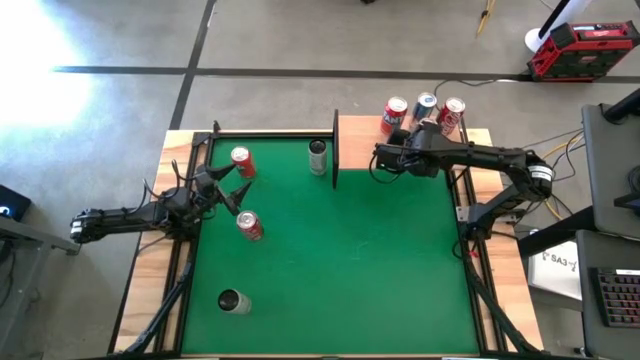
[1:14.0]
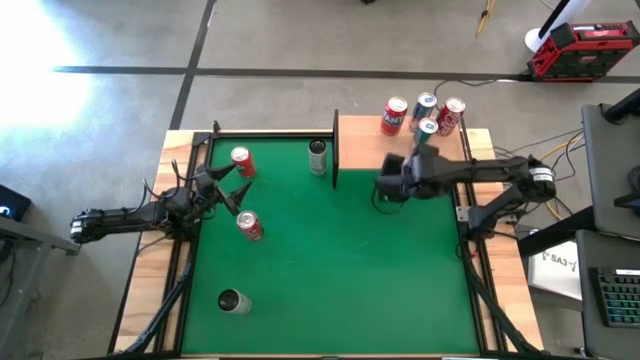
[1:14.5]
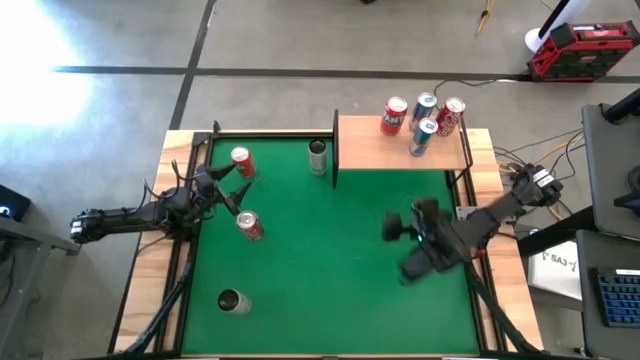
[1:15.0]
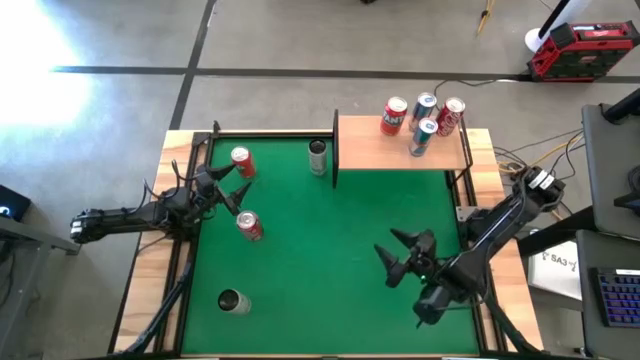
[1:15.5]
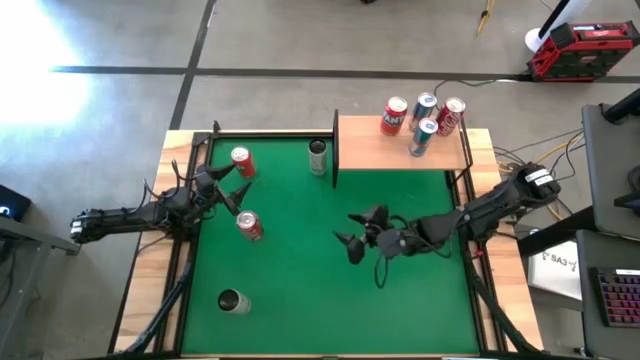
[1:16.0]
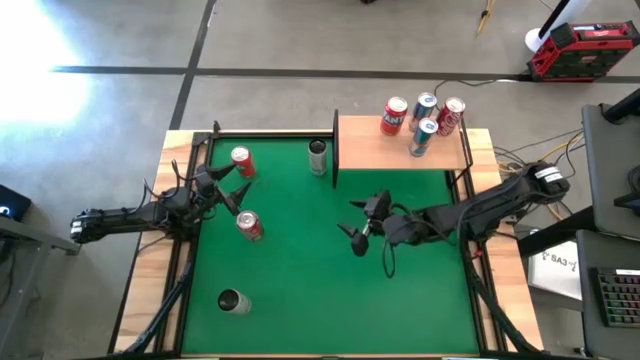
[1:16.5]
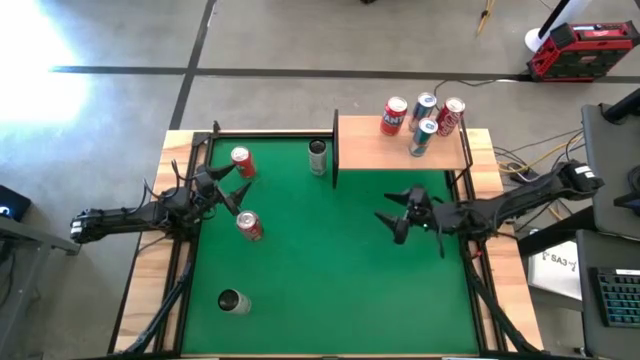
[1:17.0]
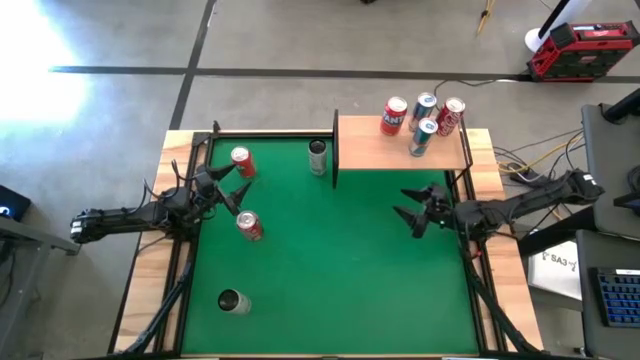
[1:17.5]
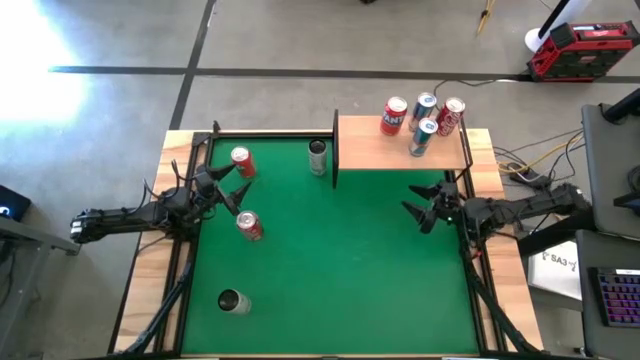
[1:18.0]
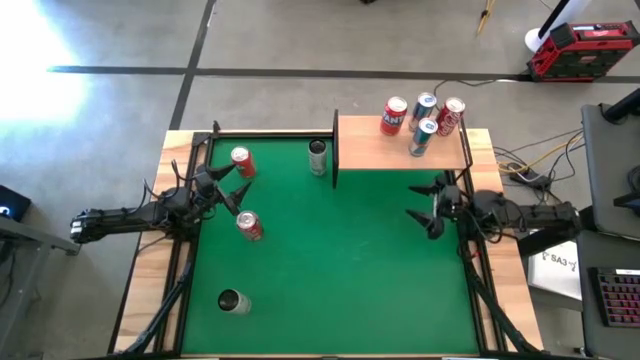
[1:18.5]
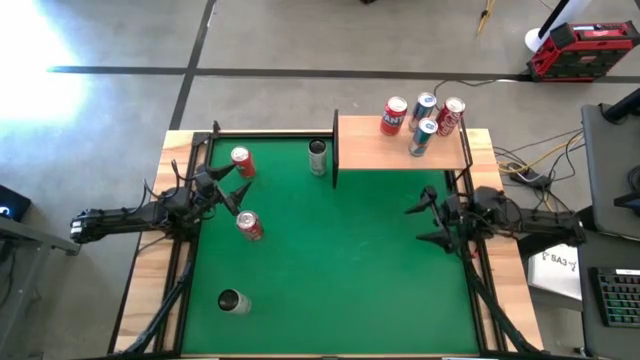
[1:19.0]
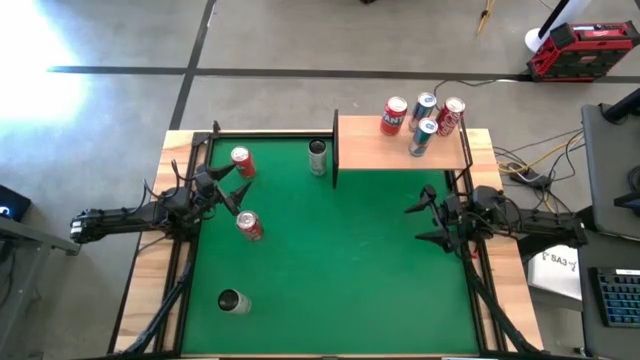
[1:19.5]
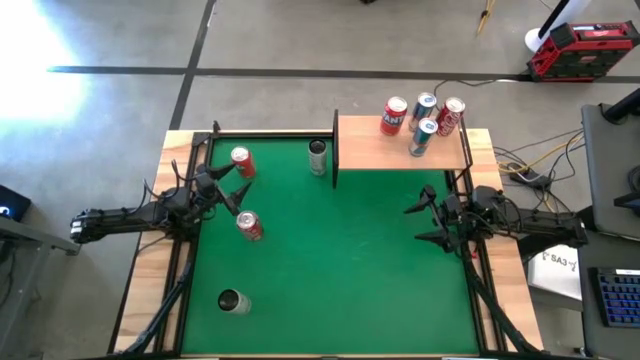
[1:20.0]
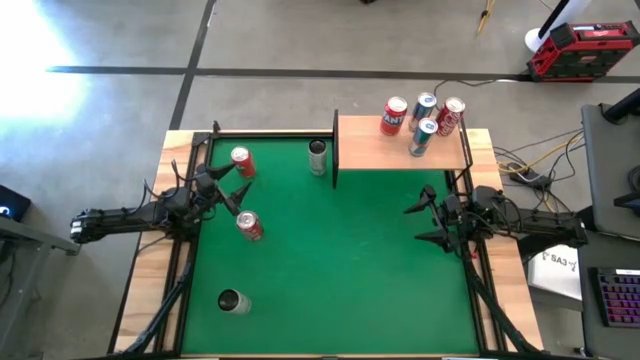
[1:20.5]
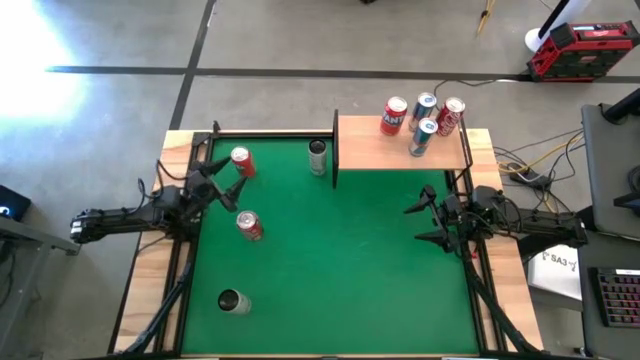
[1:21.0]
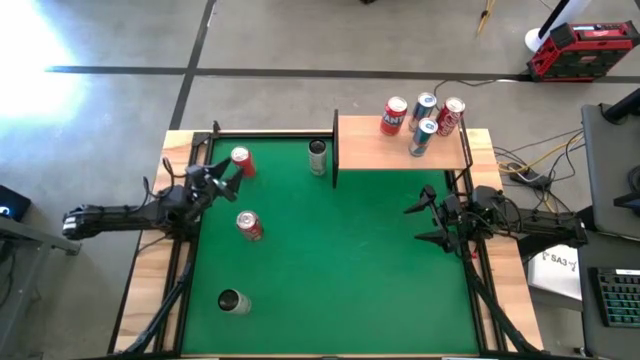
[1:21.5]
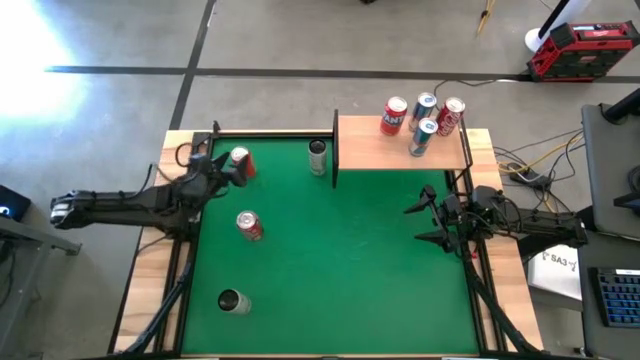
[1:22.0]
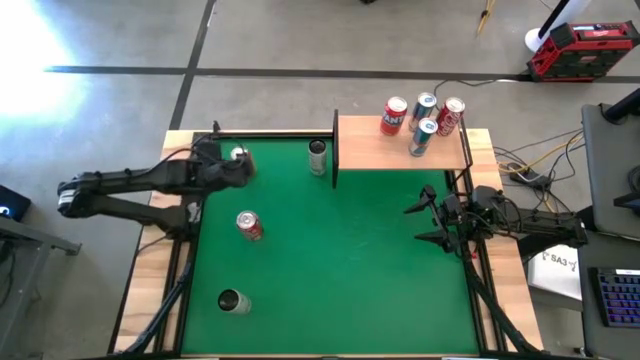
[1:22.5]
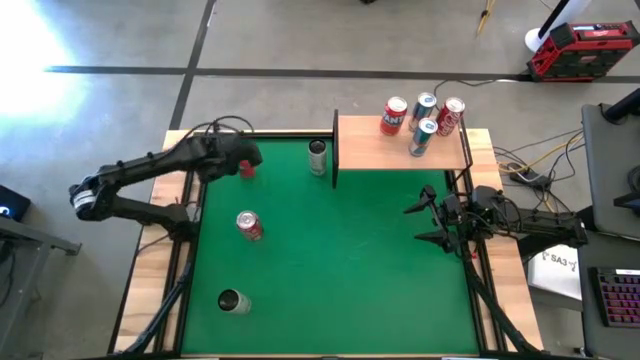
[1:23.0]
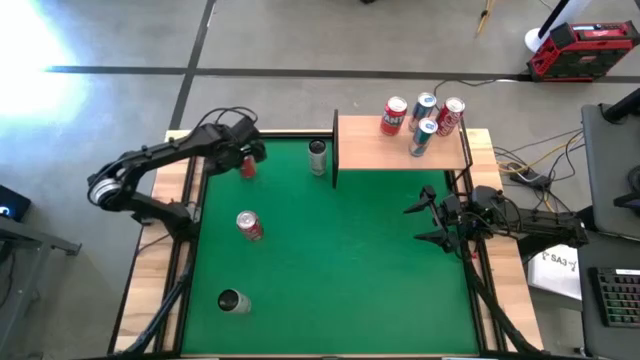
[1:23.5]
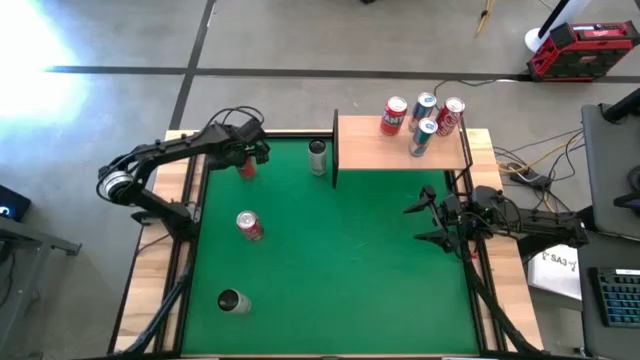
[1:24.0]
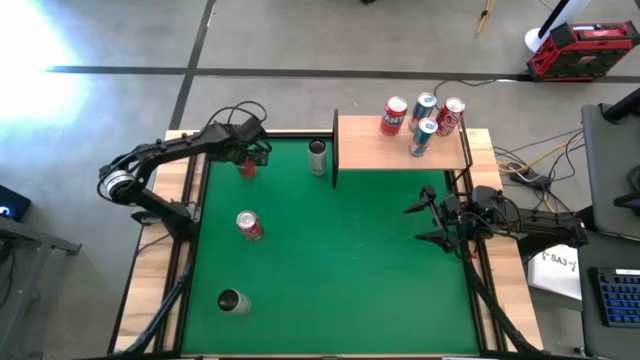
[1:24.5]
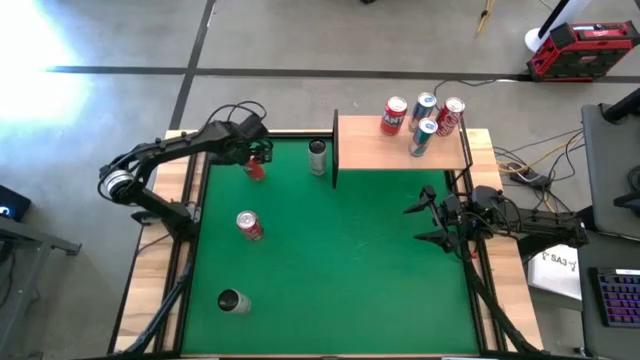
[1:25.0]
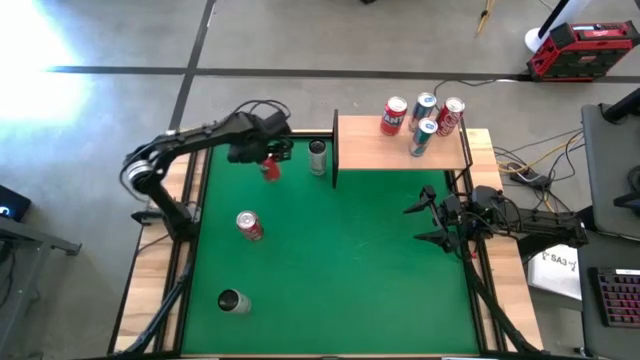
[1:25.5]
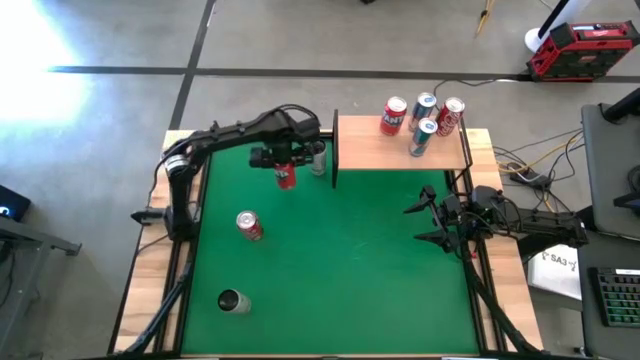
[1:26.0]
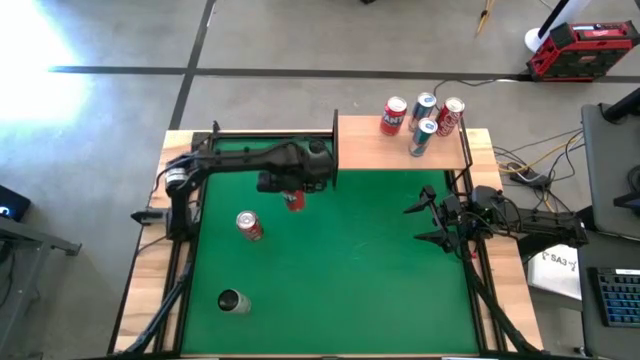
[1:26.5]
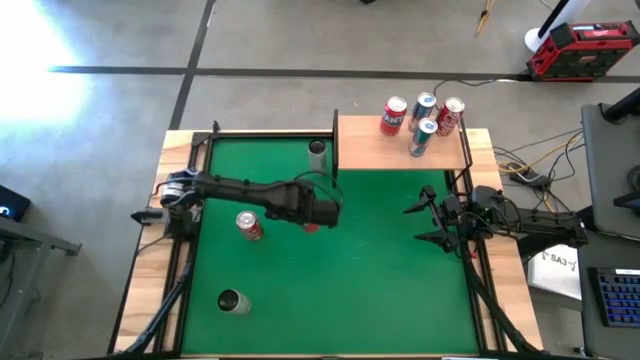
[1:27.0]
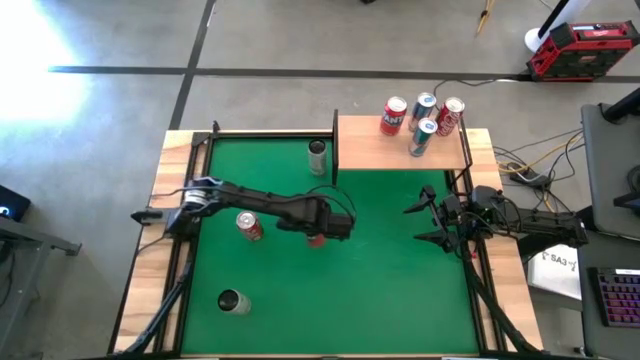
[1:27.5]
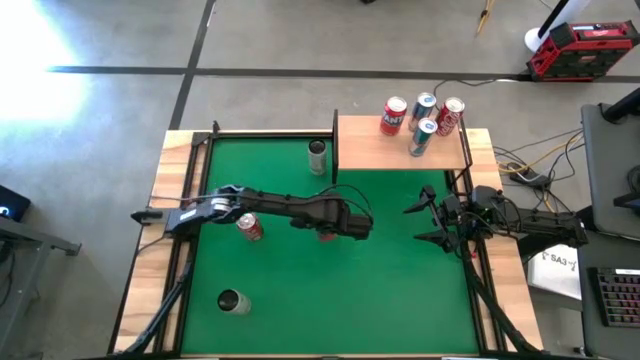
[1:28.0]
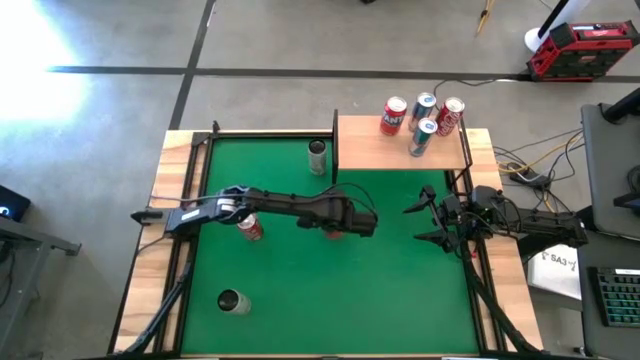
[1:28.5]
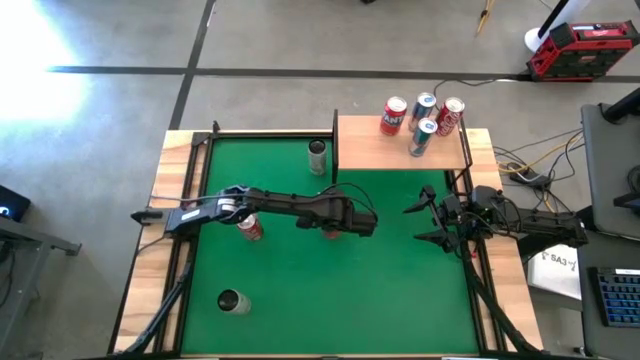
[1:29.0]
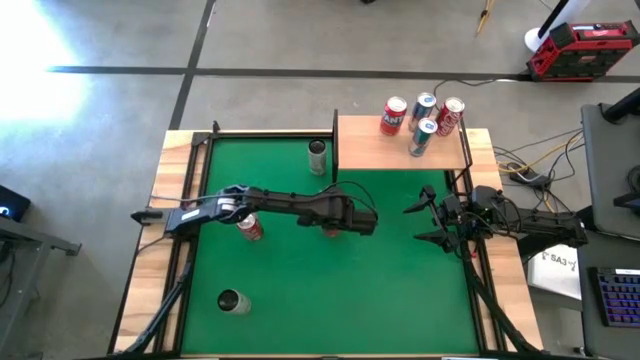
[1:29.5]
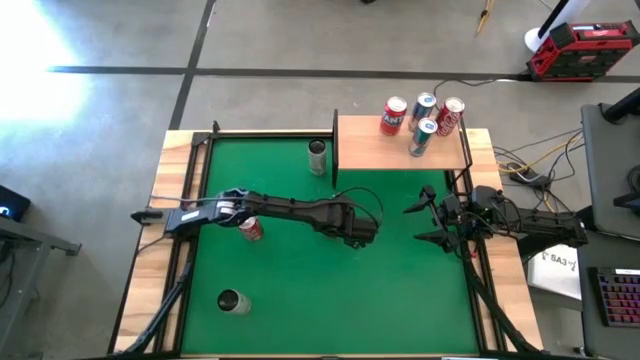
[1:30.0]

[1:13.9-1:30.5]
Task: Place canned beverage on shelf
Put the red soda can on the shelf aligned with the other red soda can
